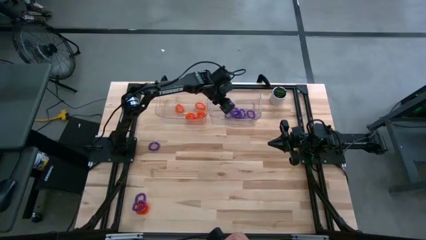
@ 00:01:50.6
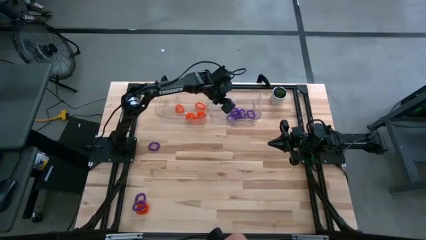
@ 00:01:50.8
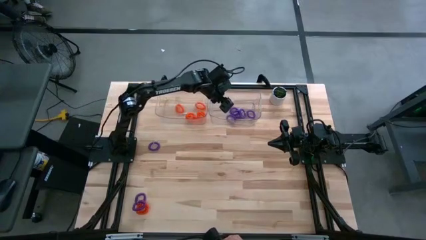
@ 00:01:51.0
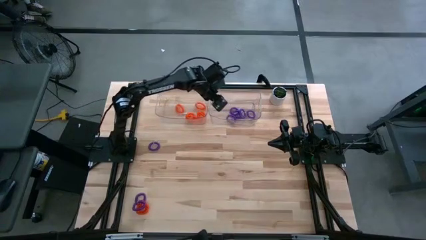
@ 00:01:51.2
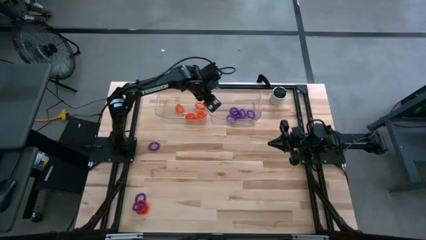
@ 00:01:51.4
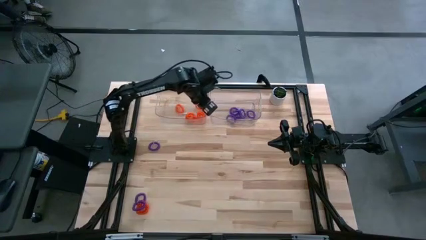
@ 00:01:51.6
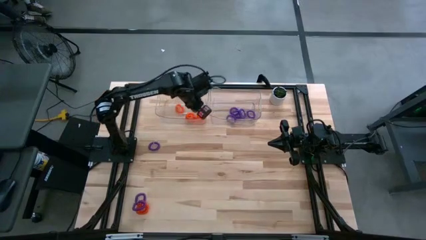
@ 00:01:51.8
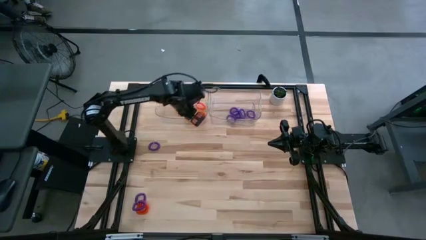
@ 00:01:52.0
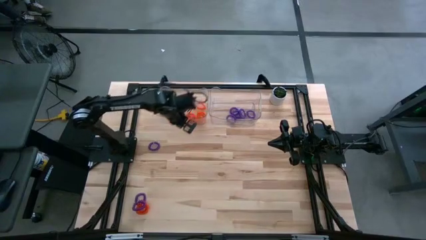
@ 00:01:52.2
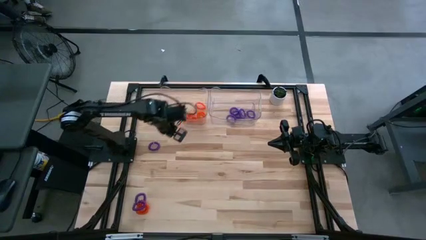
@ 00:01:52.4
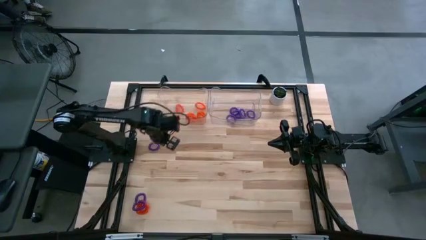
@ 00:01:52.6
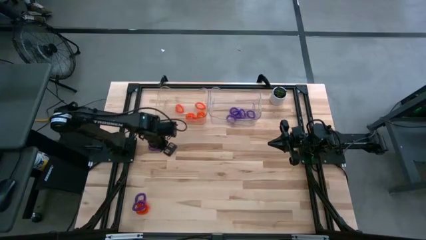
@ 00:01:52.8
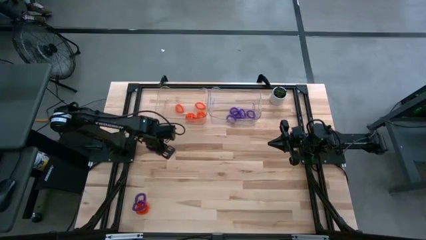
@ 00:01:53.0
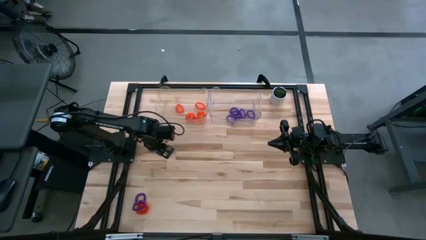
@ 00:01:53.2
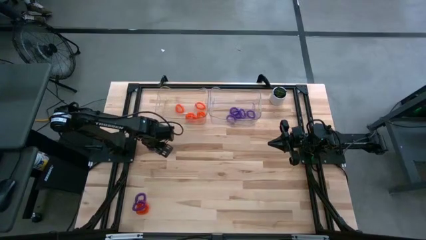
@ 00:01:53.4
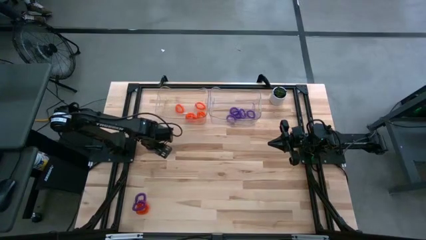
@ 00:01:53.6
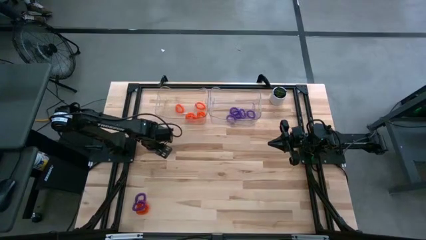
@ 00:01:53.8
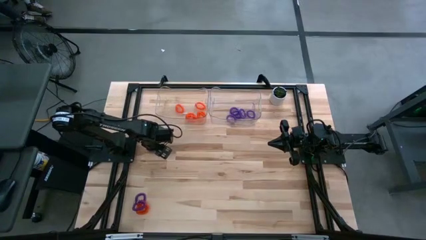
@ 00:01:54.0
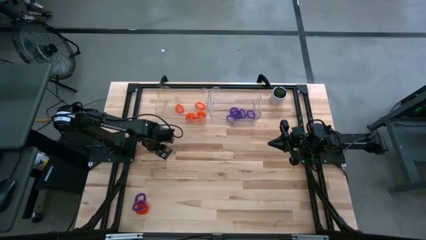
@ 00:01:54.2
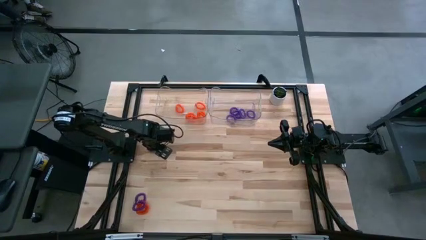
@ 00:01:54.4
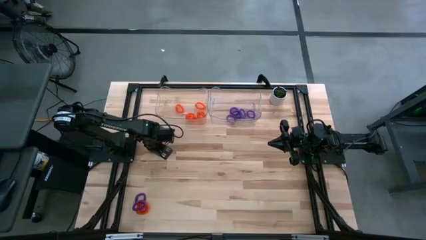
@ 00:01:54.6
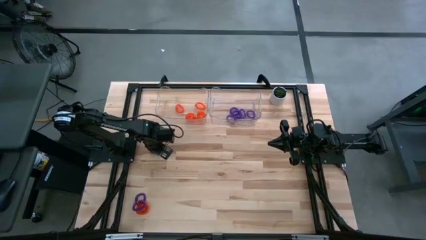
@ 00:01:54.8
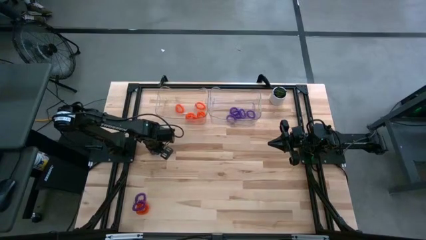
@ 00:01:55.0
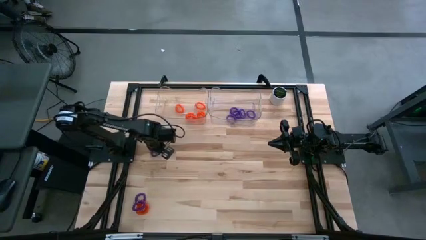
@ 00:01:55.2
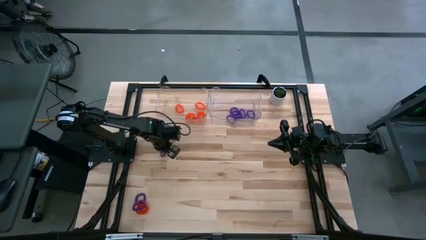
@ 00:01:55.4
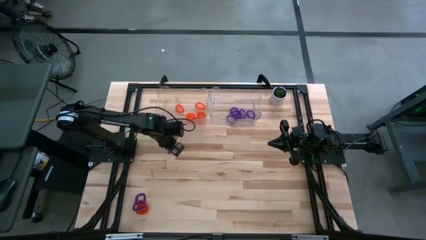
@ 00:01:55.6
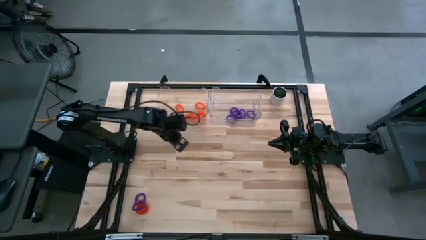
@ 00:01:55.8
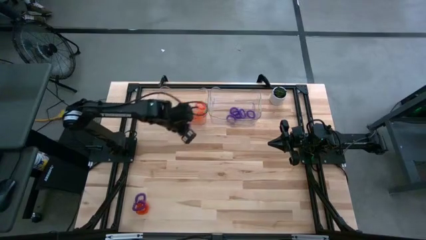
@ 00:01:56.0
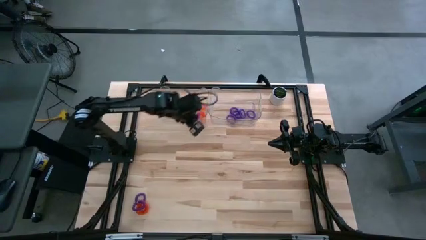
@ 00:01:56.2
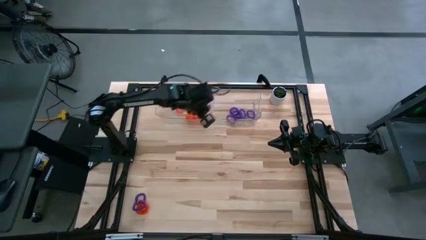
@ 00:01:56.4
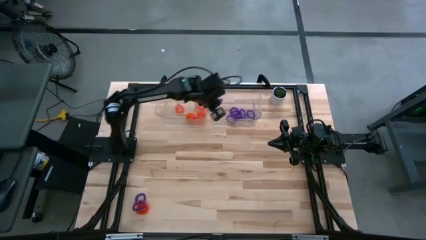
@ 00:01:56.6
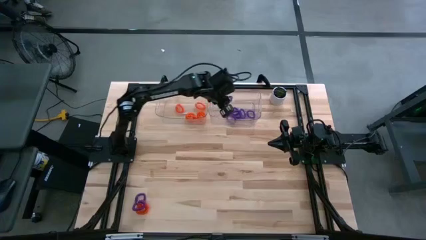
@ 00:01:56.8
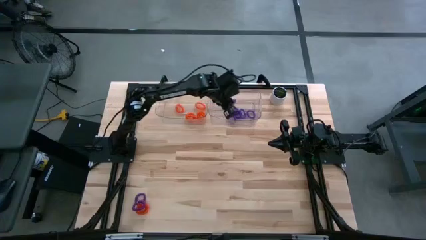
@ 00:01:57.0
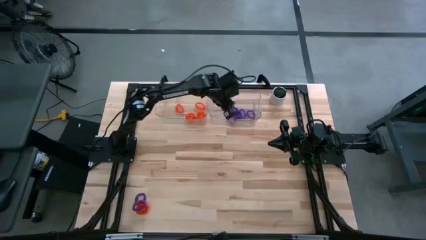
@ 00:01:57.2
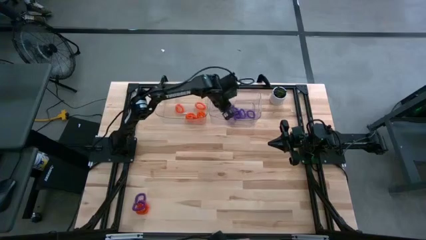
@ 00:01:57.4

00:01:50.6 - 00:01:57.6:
Task: Sort spring keychains
Put the violet spring keychain into the right transparent bin

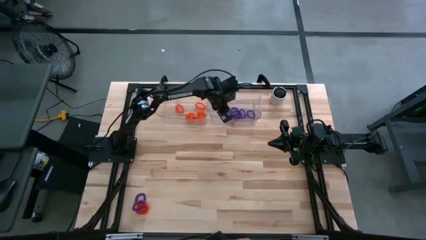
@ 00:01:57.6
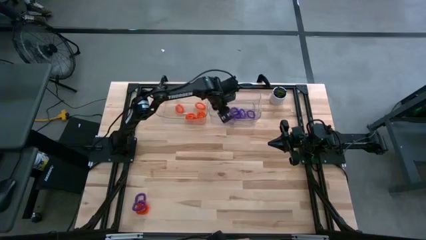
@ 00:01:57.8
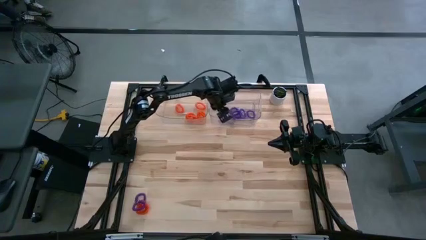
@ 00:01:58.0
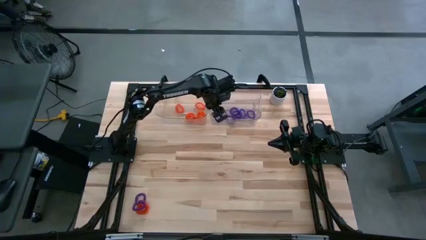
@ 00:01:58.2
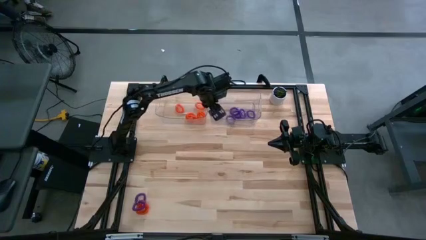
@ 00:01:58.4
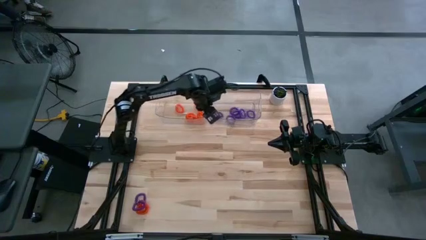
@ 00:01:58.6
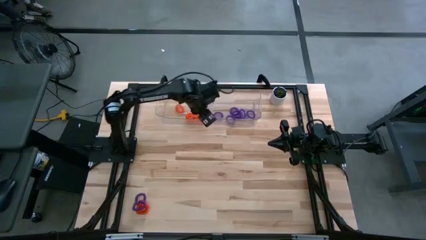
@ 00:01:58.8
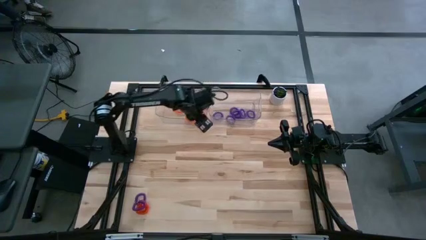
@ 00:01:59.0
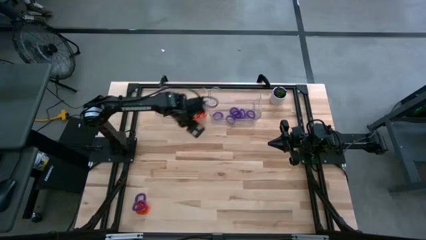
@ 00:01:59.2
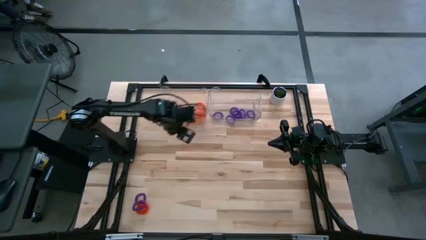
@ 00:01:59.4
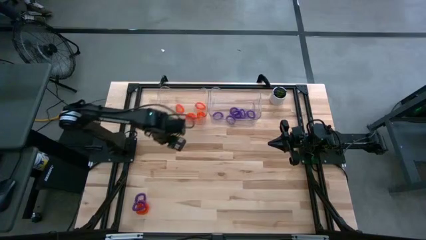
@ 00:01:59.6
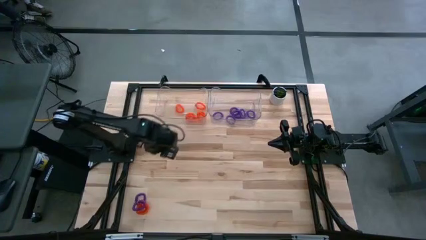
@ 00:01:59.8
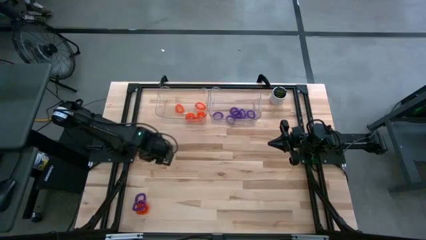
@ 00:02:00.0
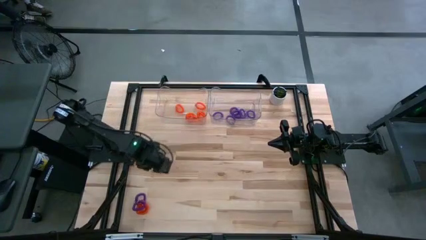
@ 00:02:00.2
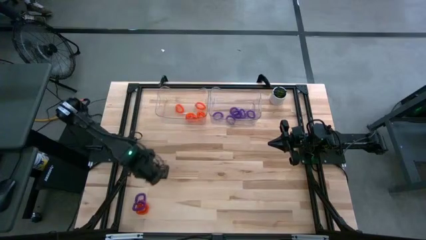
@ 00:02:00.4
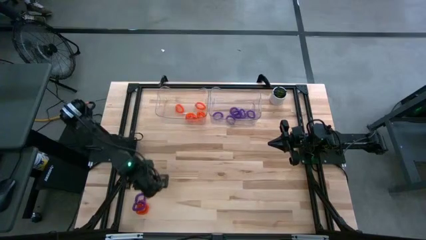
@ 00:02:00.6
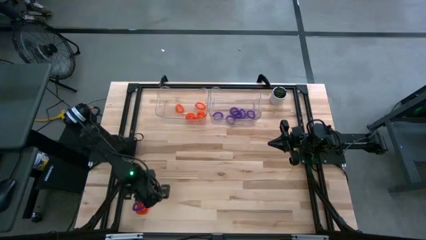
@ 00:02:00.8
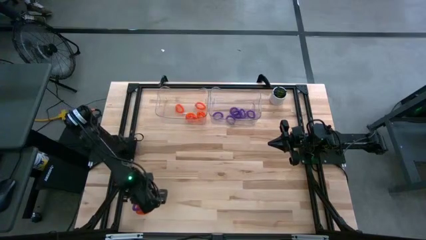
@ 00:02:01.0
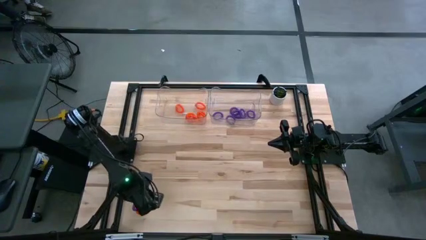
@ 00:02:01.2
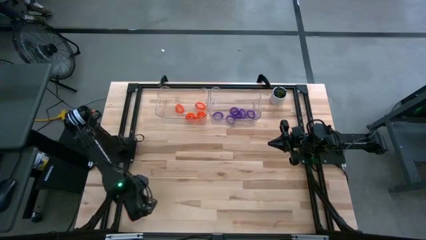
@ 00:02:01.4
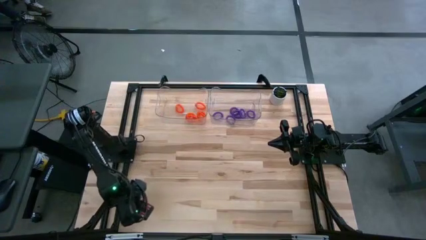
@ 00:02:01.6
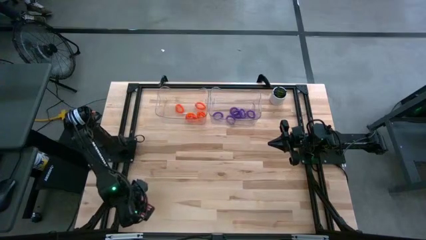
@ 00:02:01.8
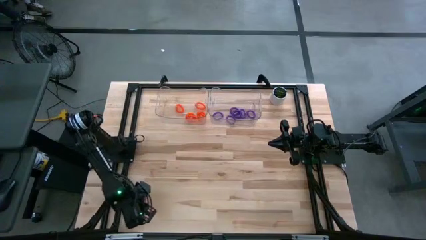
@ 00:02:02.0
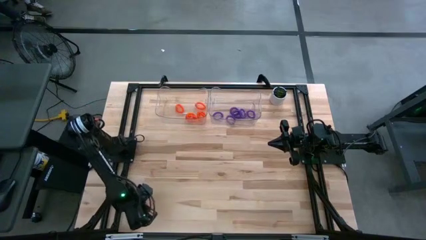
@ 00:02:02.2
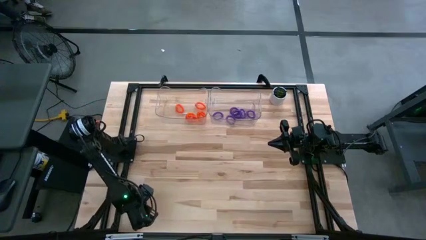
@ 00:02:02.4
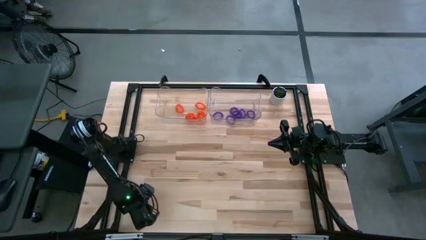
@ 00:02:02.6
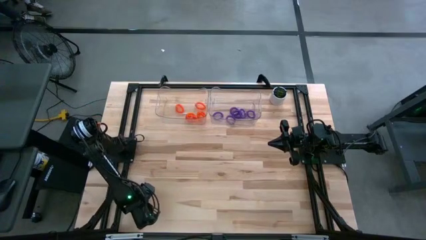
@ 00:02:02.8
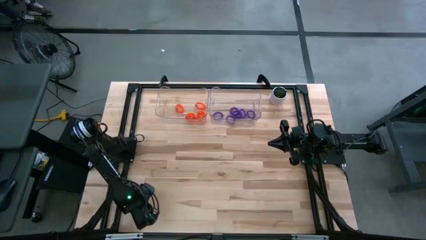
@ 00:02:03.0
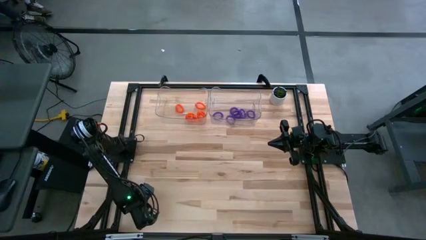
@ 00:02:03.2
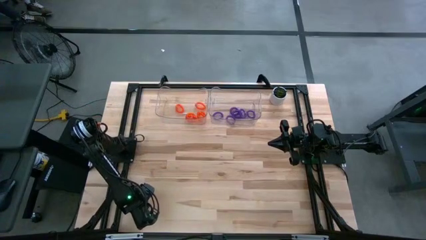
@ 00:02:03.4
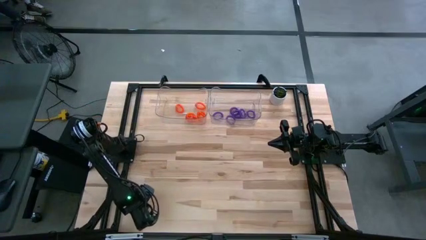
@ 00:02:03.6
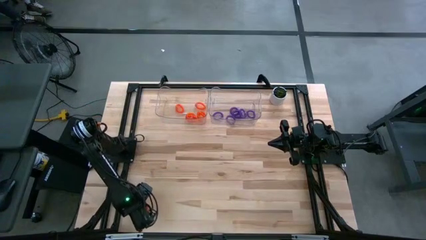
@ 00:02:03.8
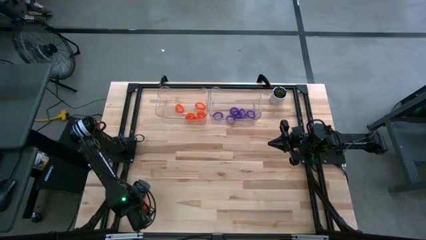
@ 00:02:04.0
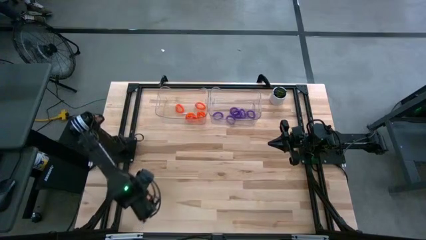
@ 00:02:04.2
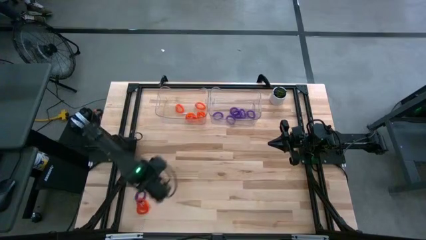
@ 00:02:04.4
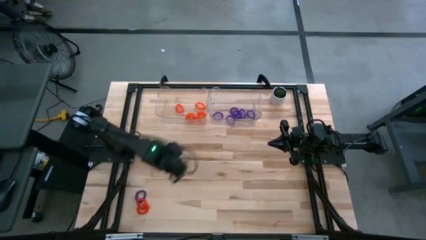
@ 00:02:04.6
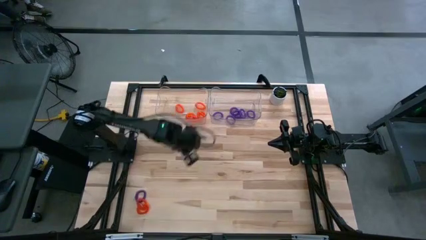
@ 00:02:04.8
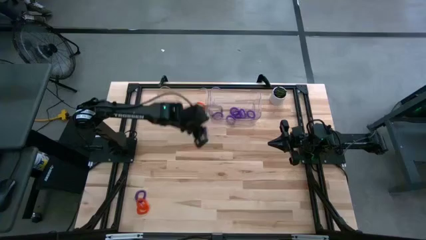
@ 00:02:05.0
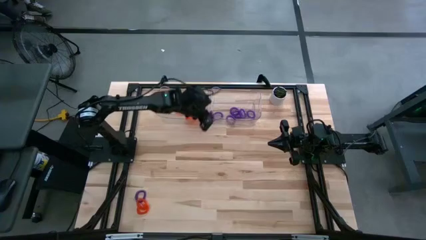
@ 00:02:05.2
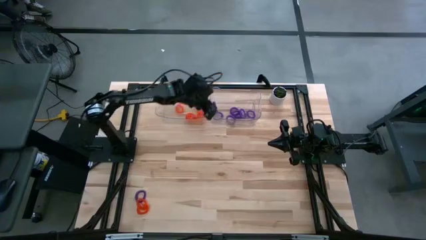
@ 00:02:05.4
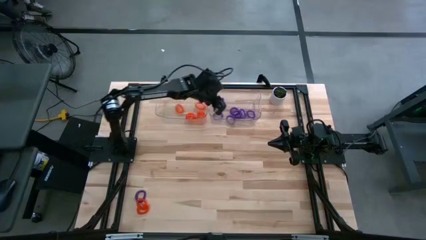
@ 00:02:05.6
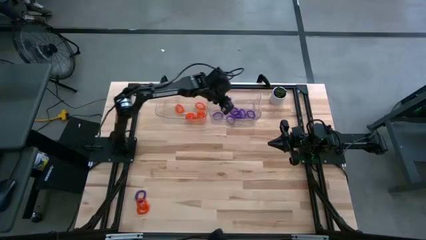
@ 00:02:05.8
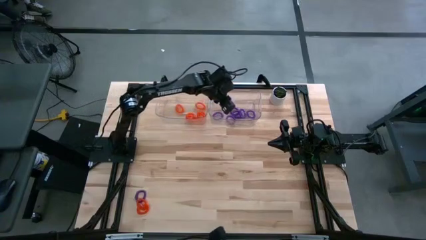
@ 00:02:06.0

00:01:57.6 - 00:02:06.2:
Put the violet spring keychain into the right transparent bin
